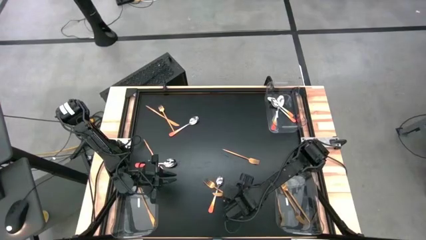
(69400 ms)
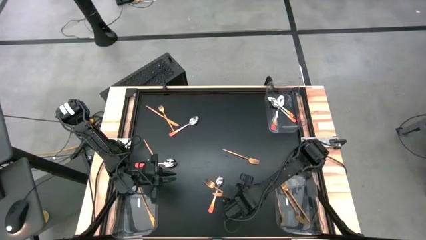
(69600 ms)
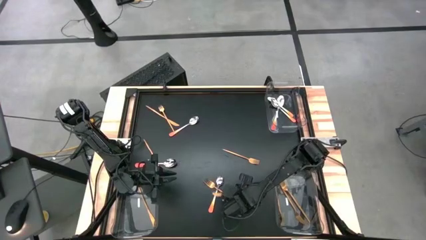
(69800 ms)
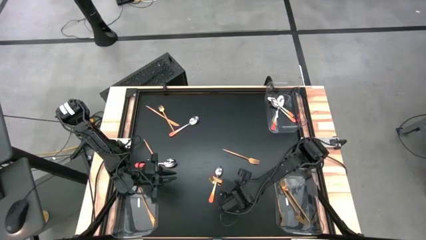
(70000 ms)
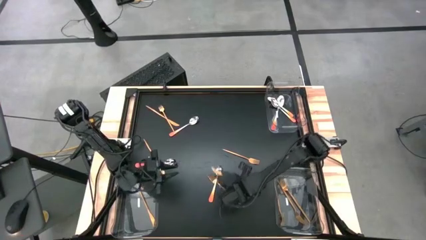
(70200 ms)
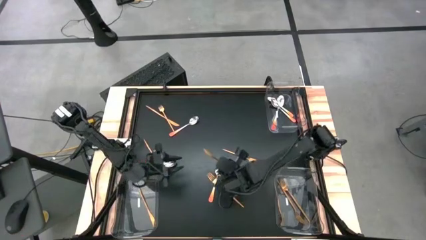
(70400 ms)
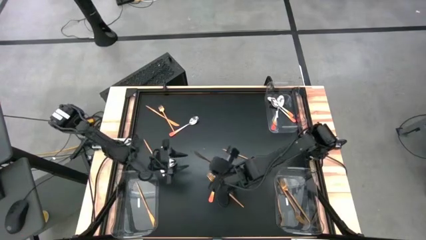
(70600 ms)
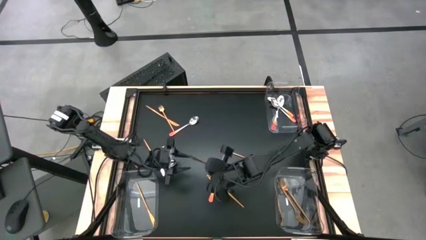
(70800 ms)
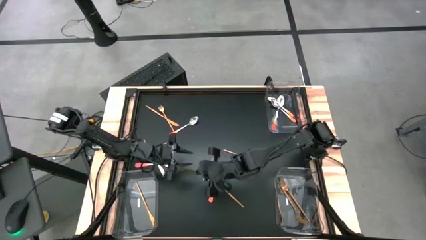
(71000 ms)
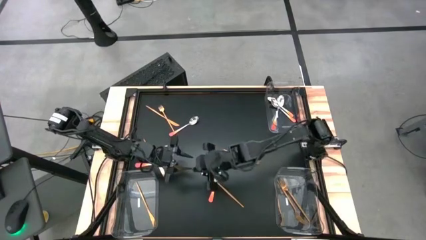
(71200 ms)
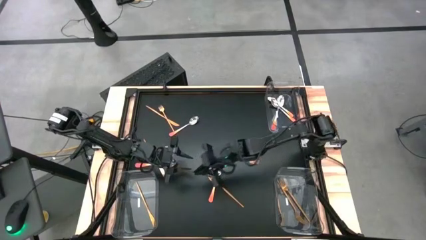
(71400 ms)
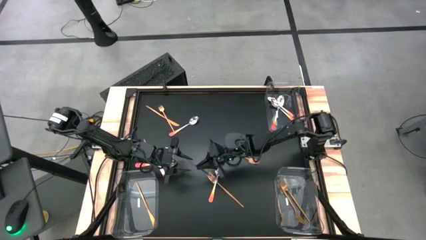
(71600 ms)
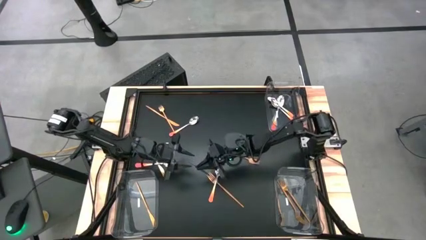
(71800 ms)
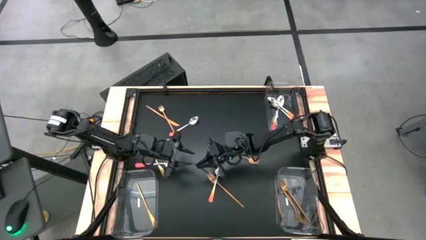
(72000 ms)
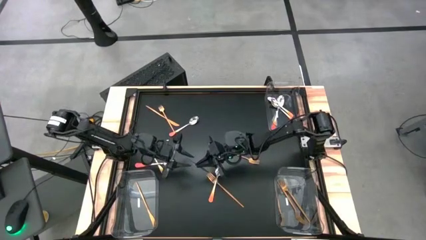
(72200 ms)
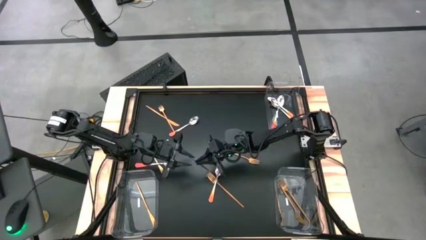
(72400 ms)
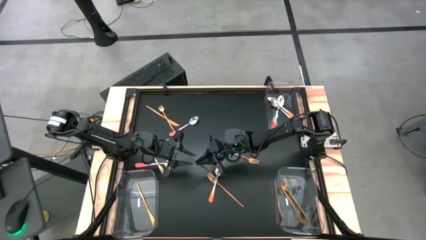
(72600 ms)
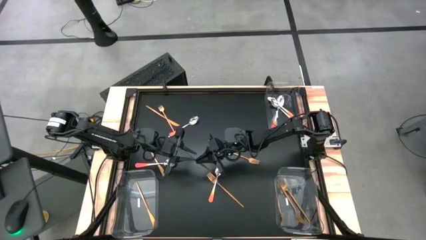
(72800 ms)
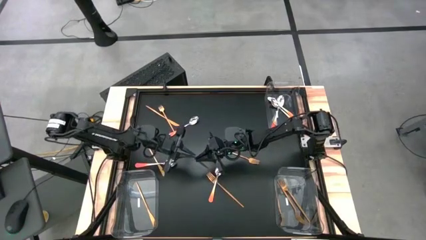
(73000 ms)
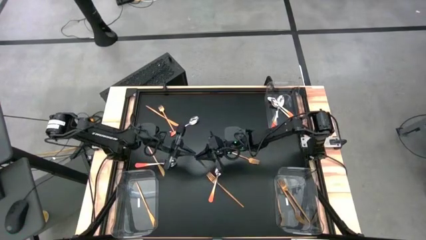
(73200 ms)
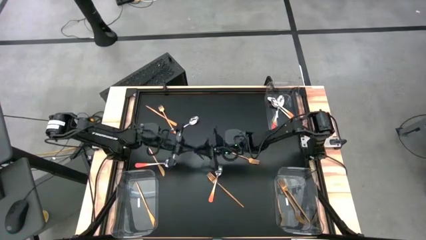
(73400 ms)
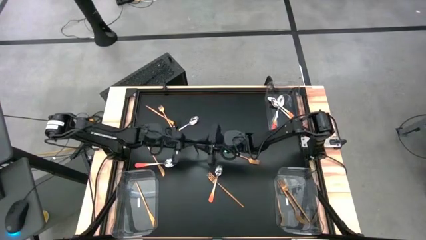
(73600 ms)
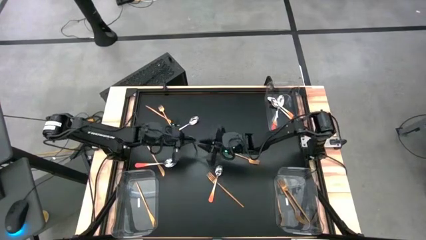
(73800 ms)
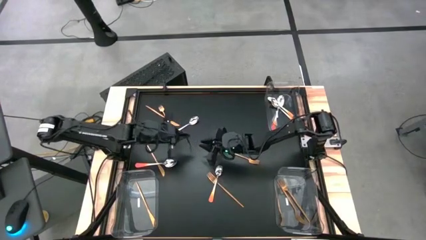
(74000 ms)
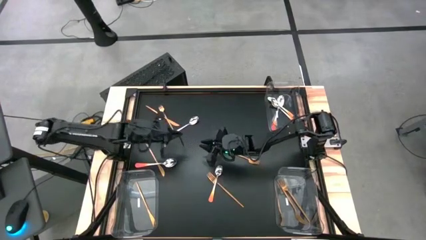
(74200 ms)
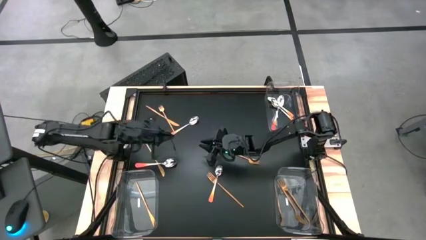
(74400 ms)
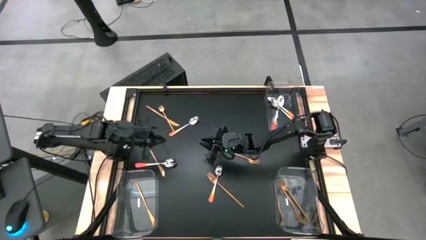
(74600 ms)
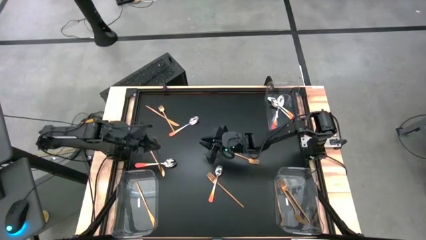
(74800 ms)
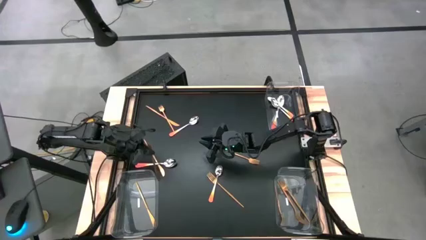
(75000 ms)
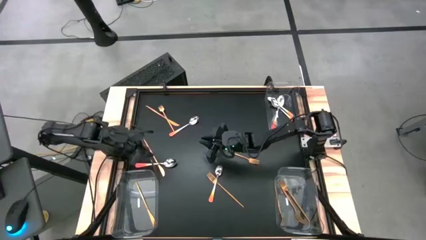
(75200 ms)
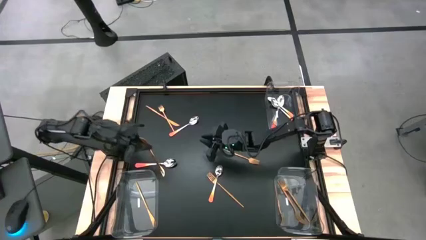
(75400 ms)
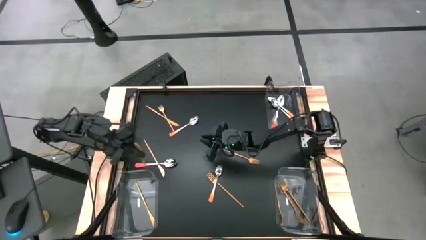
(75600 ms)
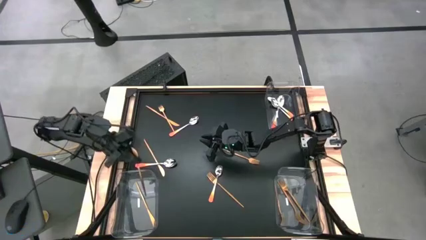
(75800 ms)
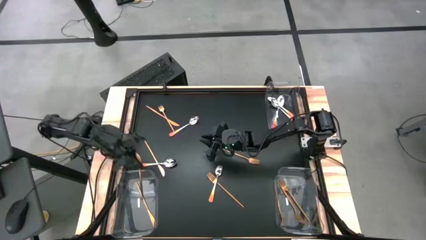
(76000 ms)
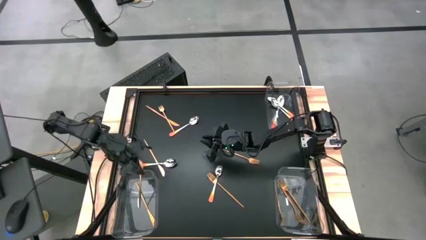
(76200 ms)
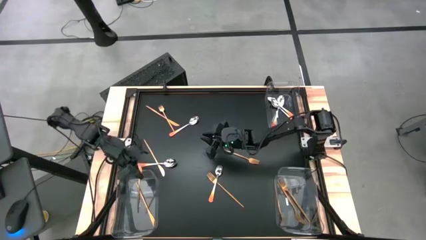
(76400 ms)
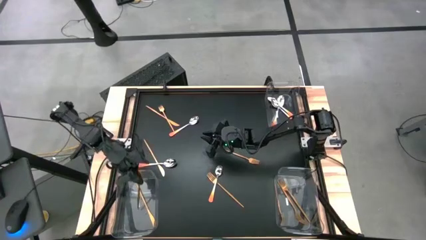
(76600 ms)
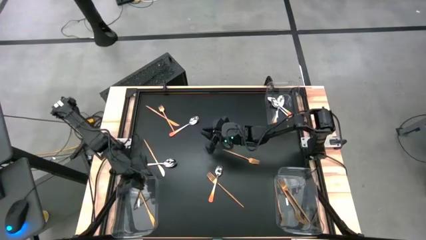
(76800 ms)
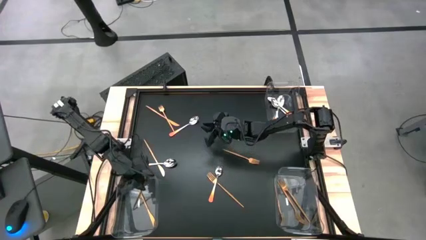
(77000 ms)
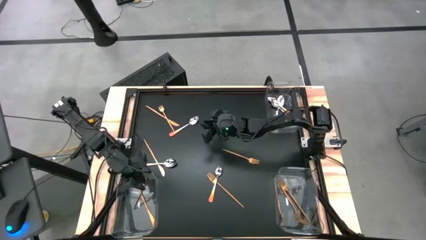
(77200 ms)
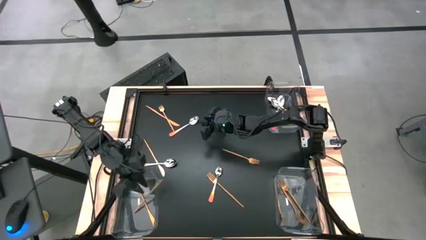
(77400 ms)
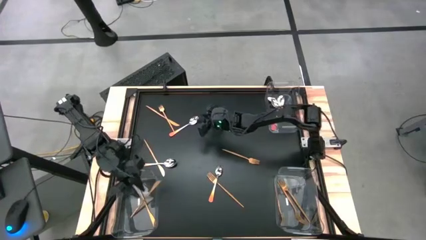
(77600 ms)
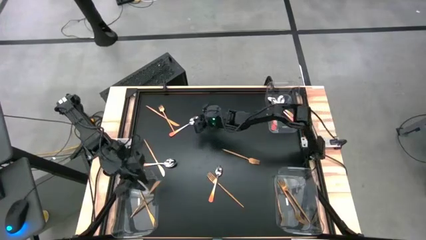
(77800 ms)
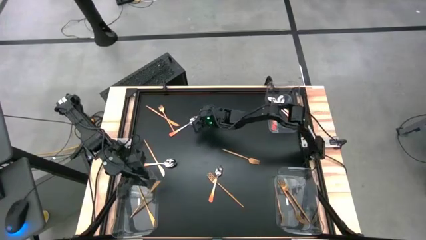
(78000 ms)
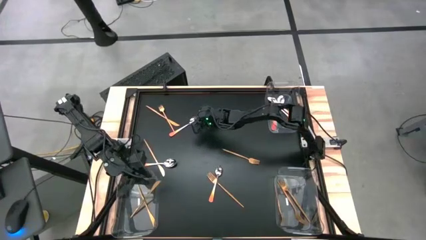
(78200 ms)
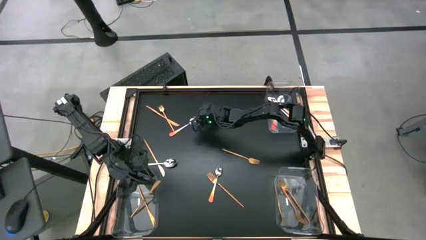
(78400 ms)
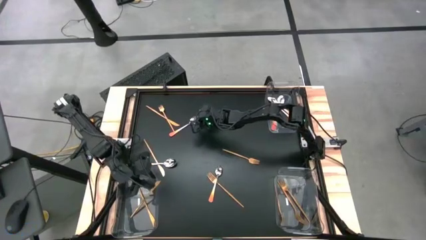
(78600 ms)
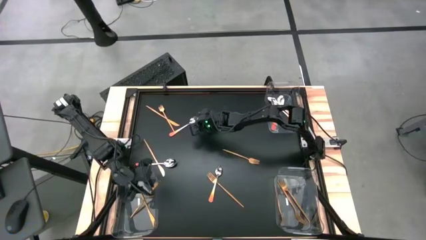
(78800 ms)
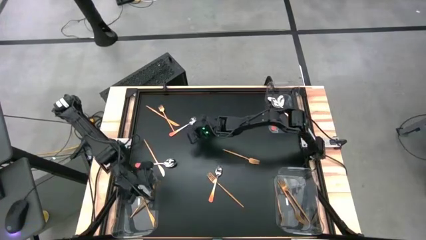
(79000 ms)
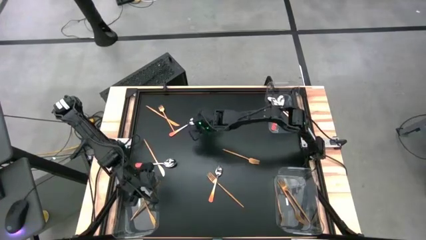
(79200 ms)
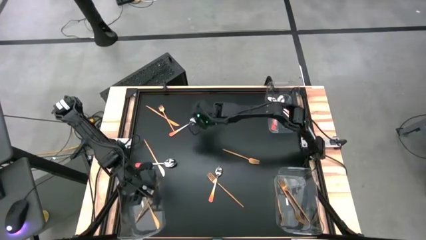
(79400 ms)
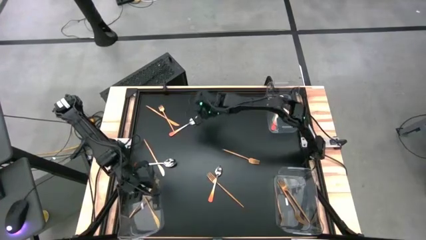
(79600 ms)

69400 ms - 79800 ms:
Task: Sort silverware by color (type)
Put the gold table knife into the bottom left transparent bin

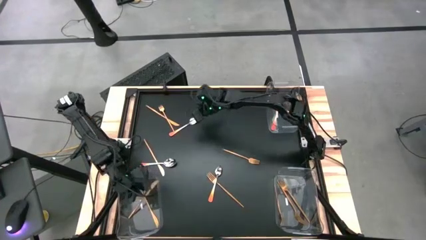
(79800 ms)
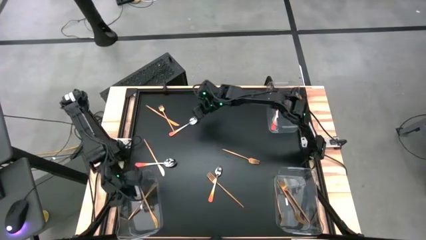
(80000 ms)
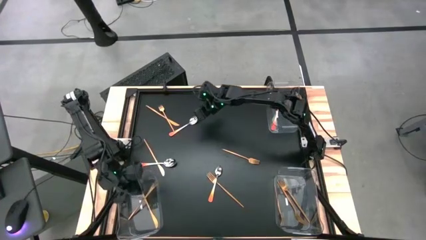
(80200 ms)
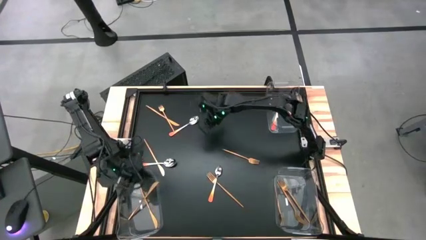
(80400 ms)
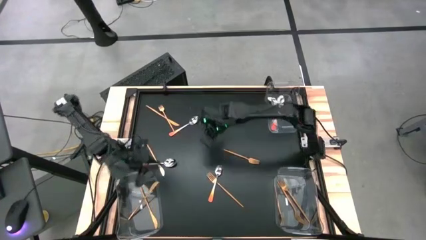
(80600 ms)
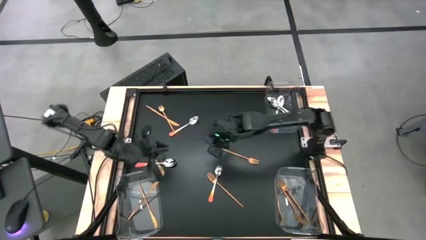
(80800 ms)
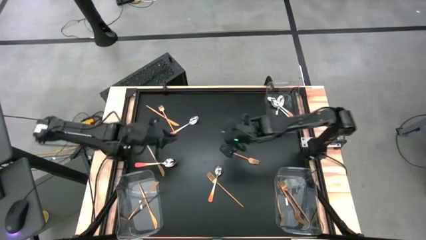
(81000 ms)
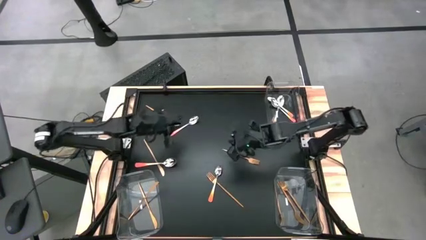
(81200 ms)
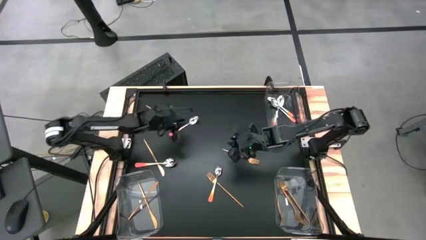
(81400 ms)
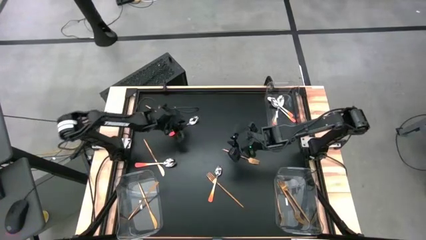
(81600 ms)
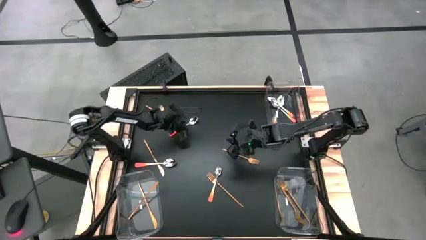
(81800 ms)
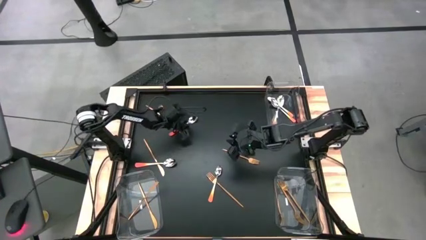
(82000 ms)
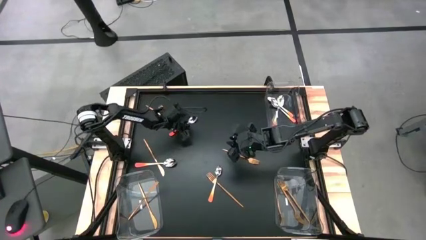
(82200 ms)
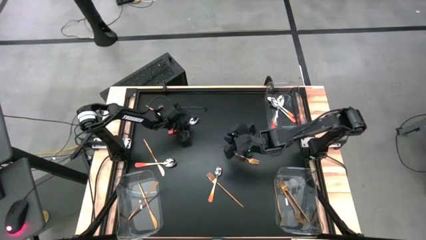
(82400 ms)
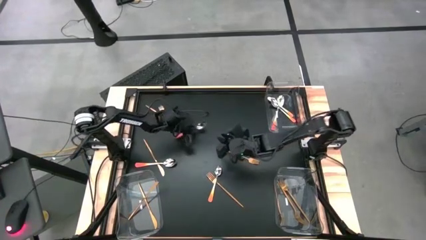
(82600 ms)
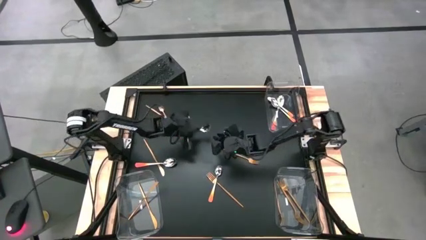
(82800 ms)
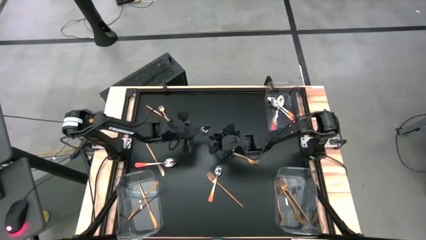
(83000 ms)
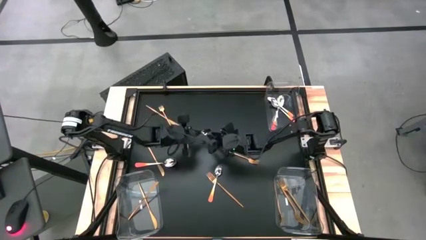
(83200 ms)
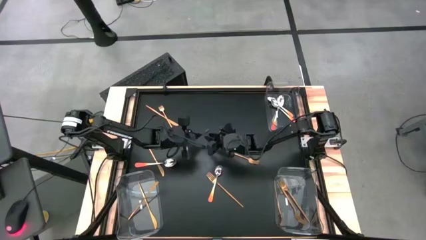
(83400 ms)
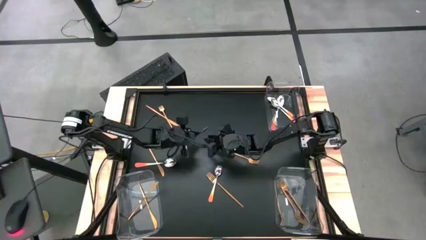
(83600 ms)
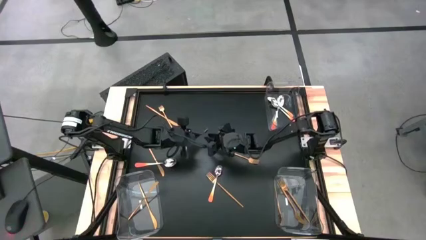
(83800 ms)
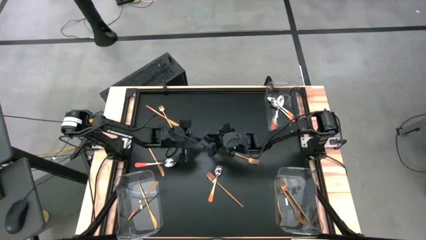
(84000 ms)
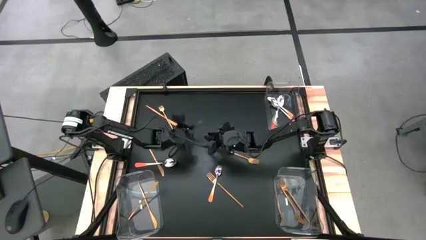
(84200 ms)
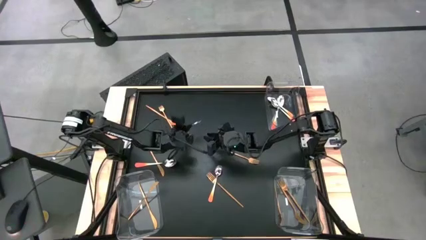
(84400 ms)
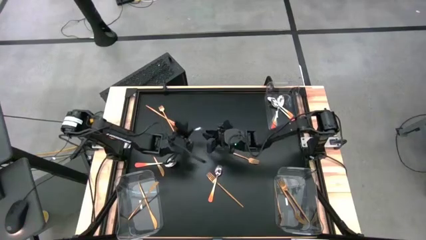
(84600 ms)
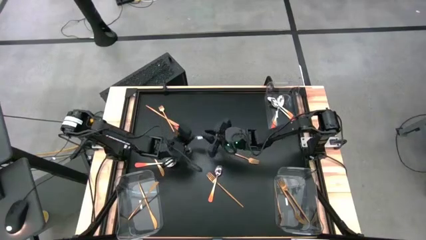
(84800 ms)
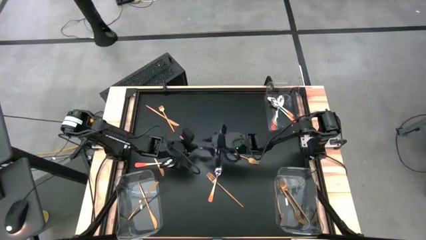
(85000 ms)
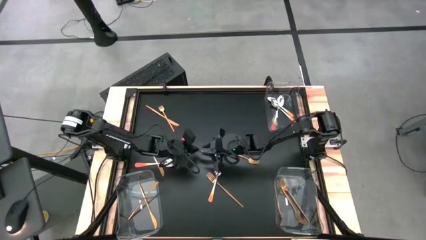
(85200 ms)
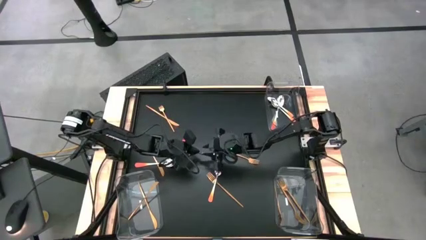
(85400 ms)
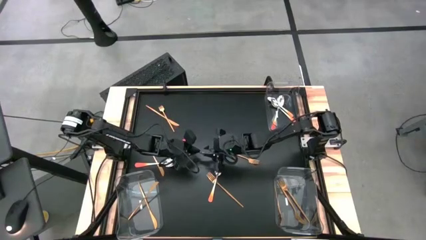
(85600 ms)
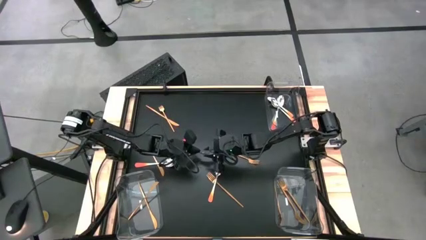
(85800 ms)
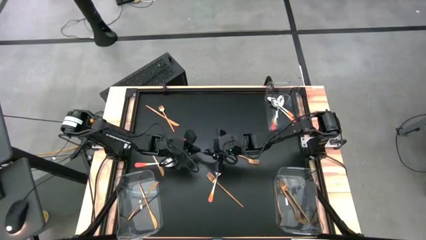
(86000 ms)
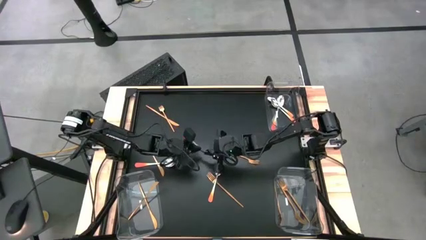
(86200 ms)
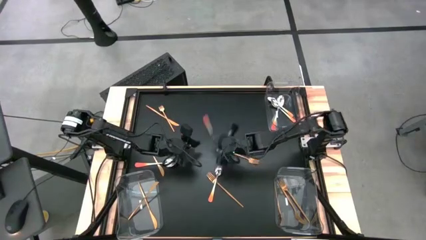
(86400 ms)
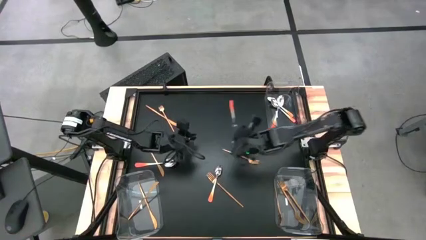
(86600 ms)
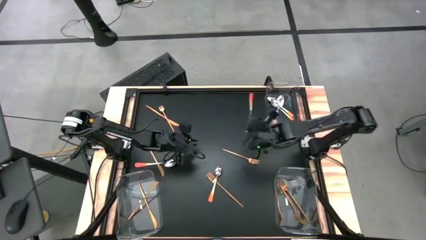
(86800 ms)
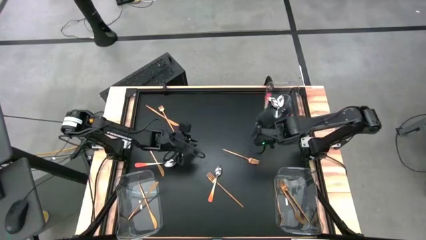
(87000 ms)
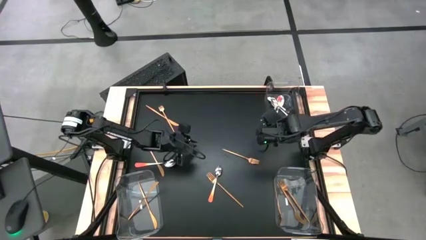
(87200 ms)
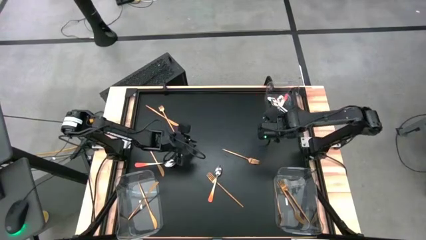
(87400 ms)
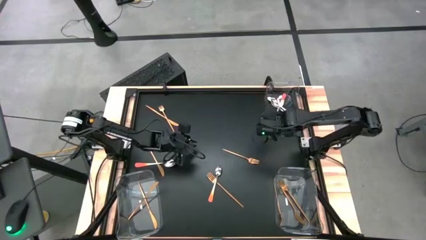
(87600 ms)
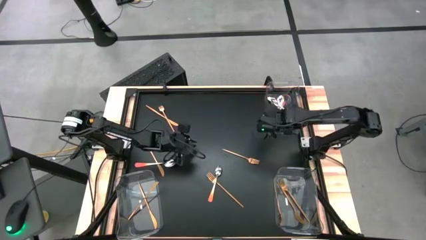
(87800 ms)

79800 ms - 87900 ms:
Put the orange spoon into the top right transparent bin
